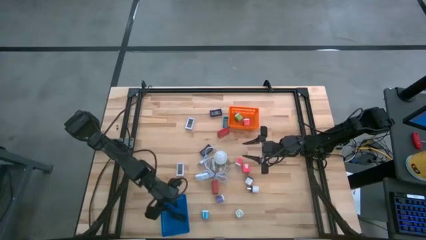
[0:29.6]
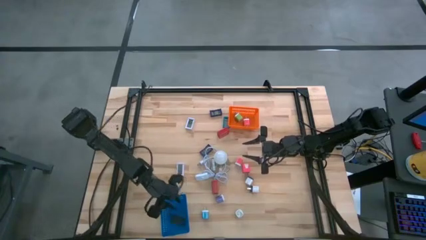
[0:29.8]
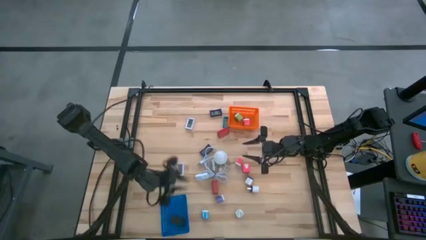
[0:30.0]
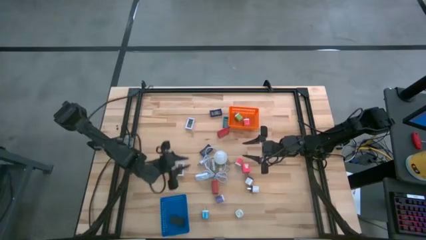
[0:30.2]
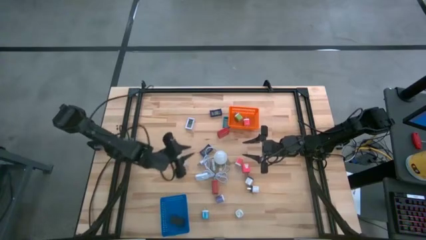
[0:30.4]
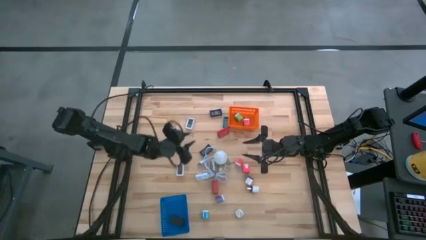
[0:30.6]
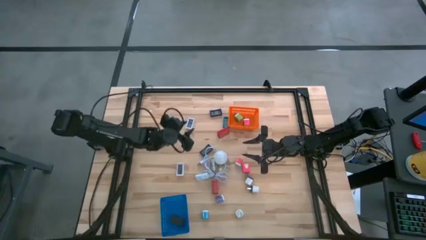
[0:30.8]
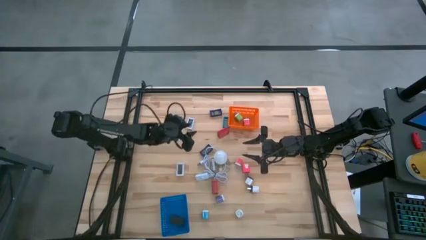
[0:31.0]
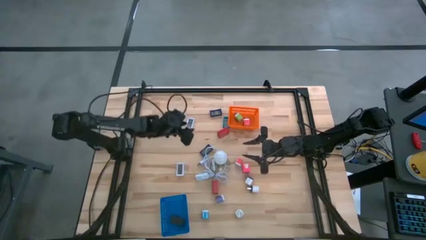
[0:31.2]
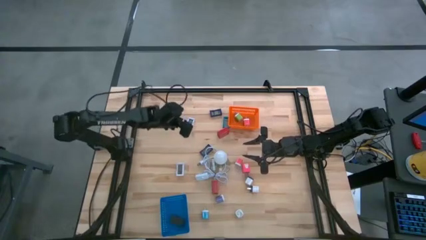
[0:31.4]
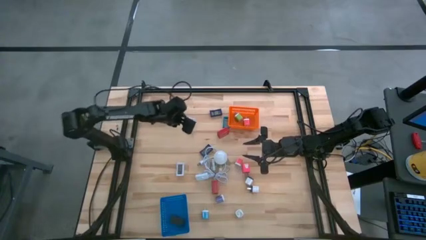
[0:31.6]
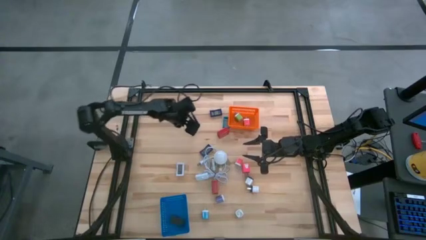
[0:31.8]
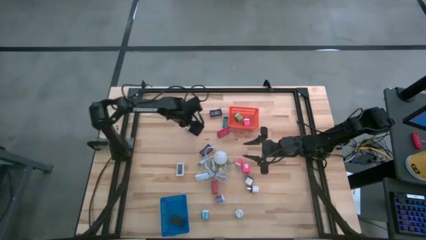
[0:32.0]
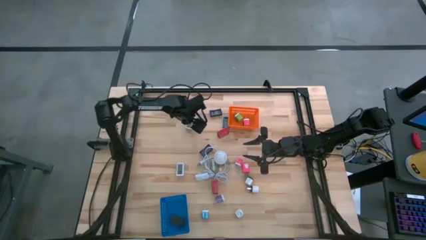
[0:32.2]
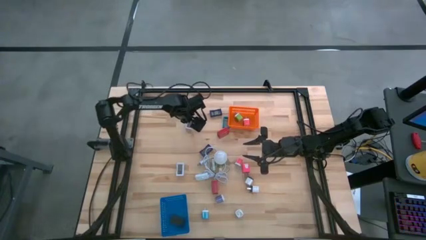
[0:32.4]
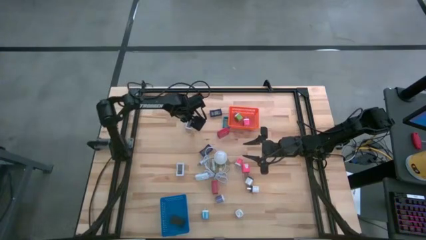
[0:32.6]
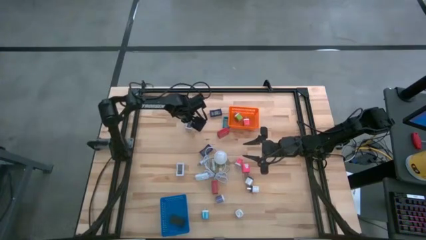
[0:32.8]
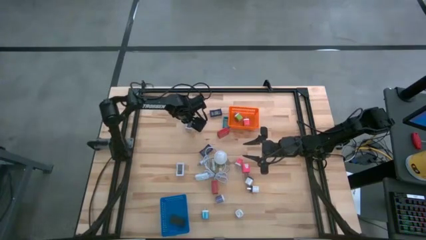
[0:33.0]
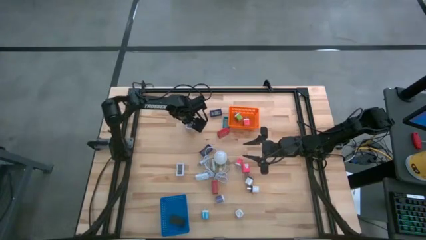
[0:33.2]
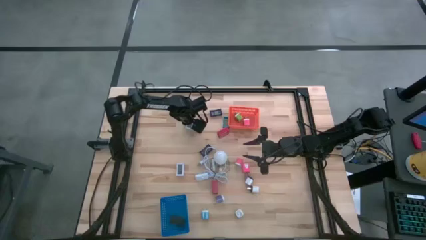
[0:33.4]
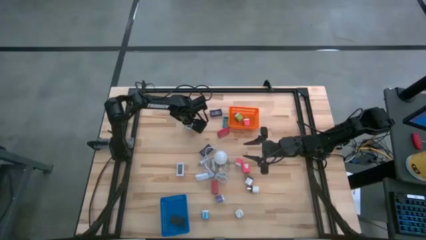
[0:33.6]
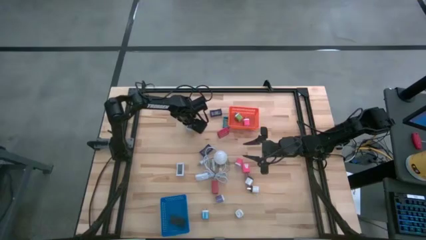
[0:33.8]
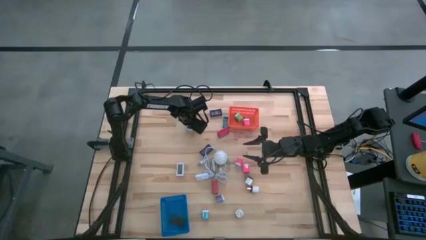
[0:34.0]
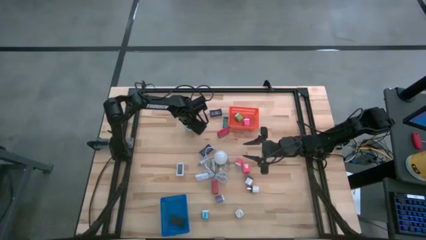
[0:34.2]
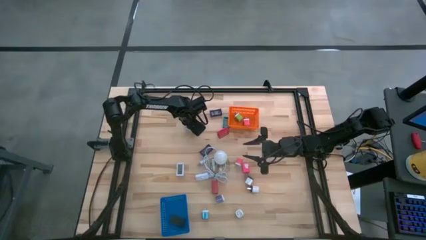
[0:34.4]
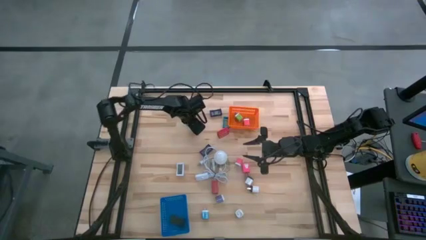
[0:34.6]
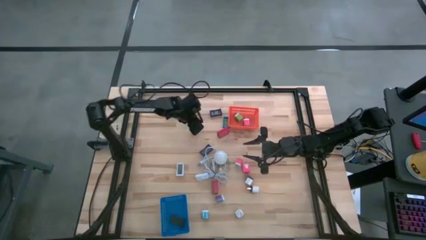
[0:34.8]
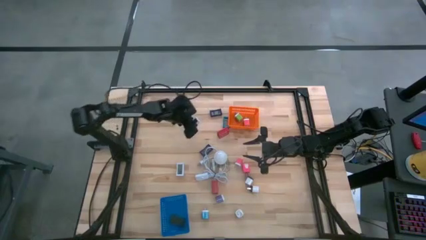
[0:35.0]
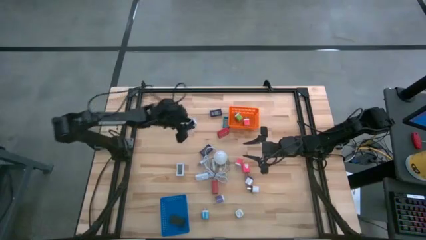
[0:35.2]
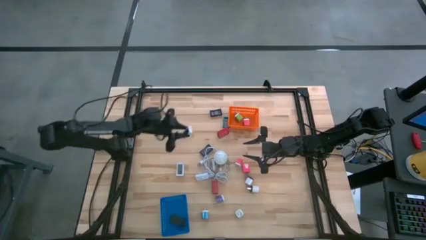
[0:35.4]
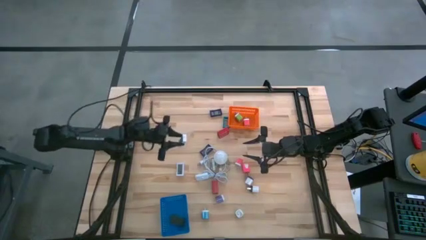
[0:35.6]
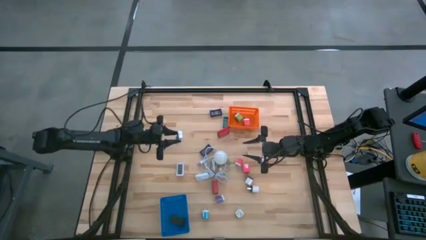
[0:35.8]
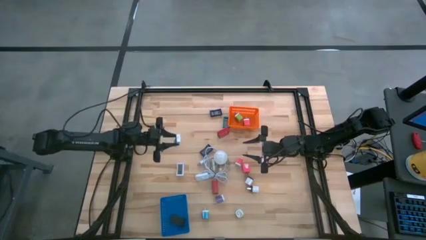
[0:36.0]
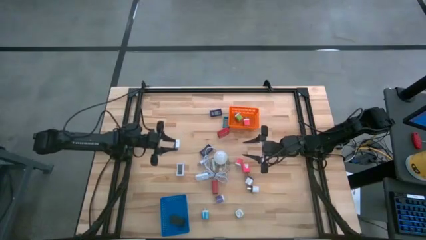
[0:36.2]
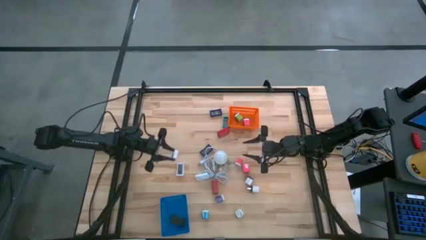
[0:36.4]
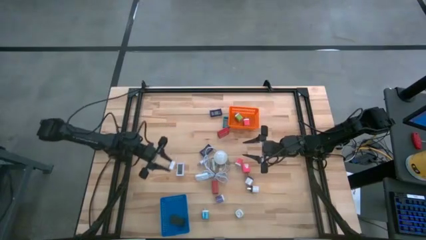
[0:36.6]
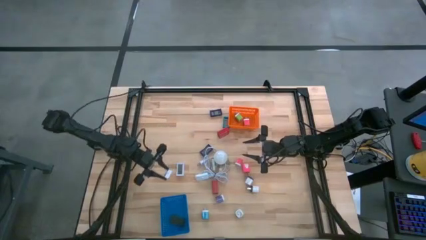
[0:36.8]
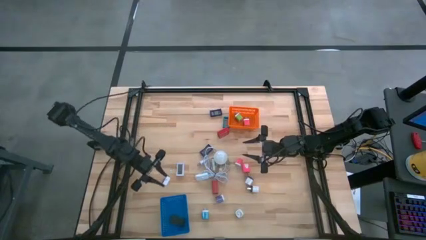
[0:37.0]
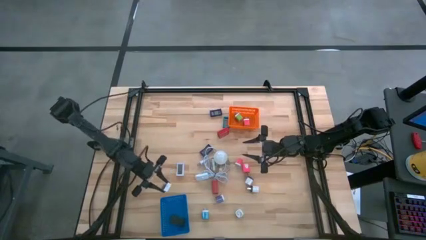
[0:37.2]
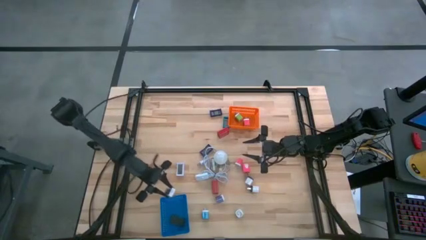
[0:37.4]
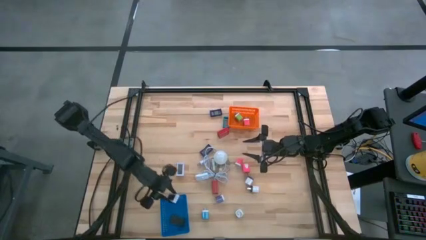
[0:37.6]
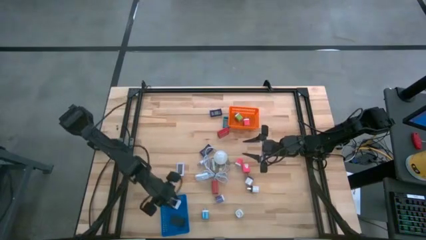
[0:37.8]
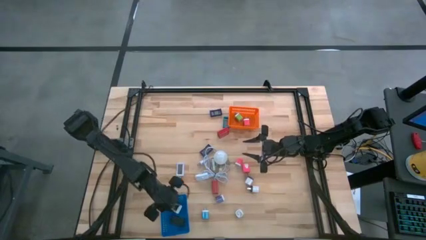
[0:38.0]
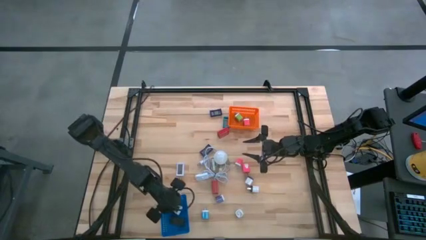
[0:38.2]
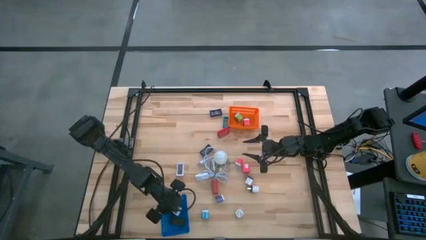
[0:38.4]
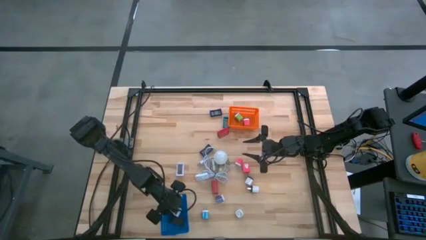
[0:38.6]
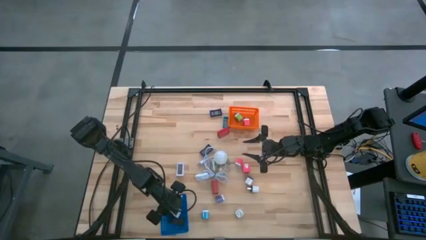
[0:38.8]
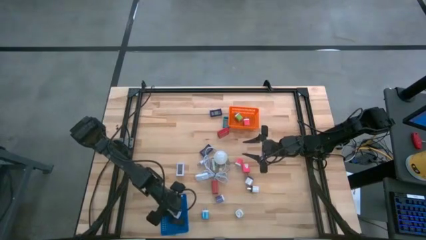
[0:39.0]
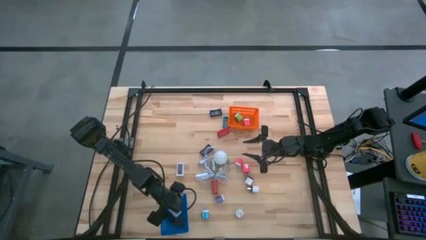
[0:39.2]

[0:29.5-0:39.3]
Task: Pick & Place Office items
Put the top white timer into the blue bin

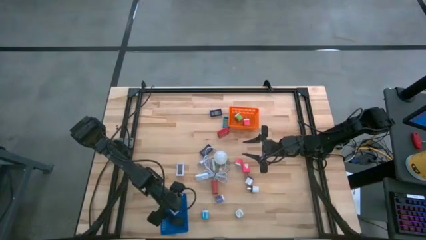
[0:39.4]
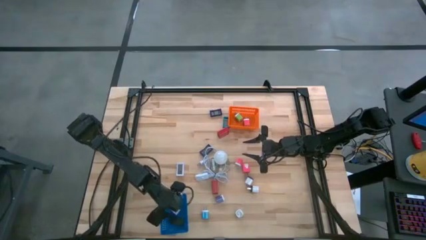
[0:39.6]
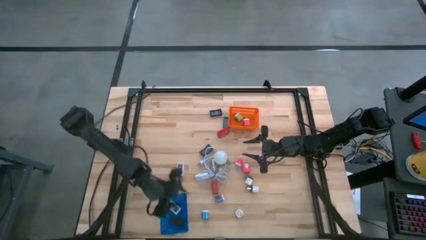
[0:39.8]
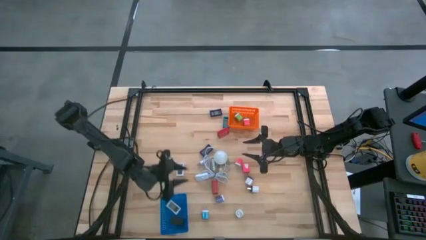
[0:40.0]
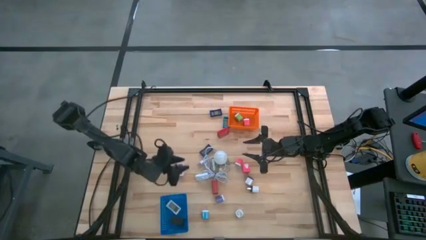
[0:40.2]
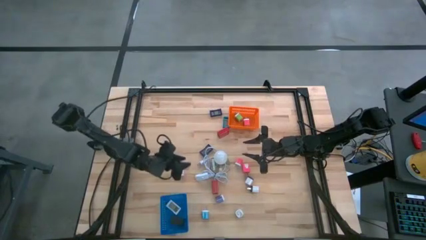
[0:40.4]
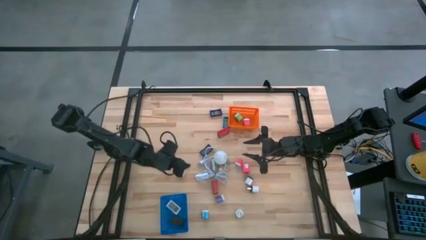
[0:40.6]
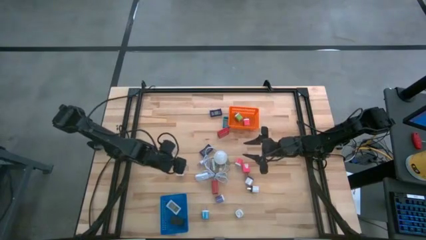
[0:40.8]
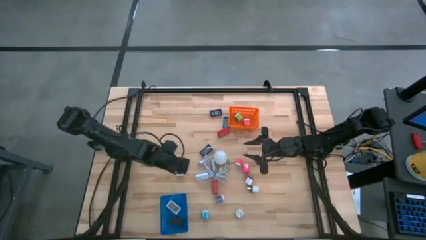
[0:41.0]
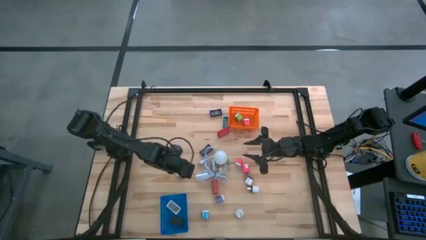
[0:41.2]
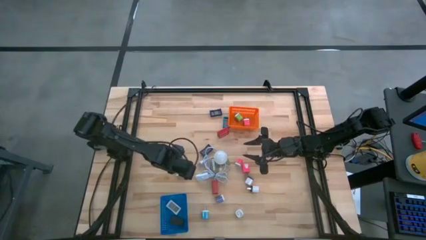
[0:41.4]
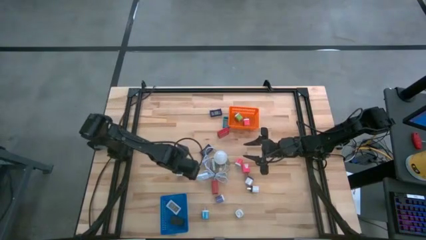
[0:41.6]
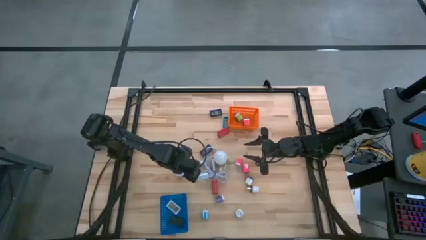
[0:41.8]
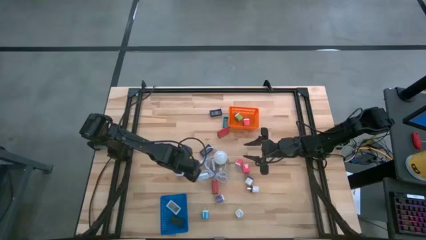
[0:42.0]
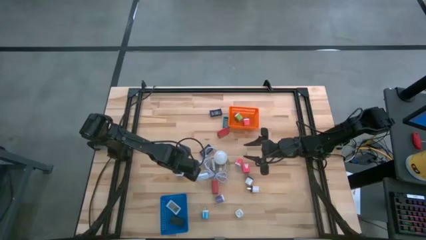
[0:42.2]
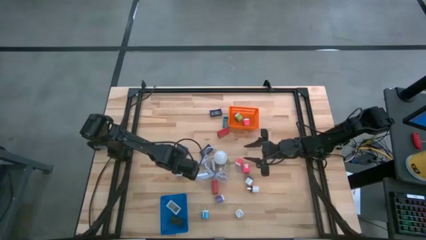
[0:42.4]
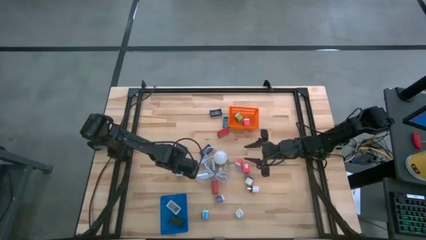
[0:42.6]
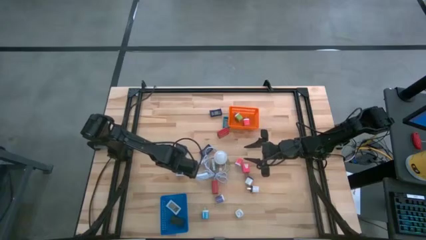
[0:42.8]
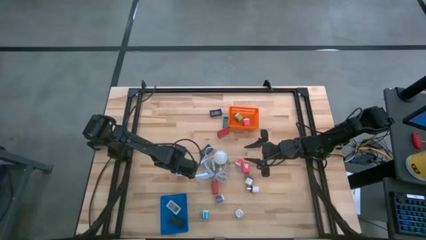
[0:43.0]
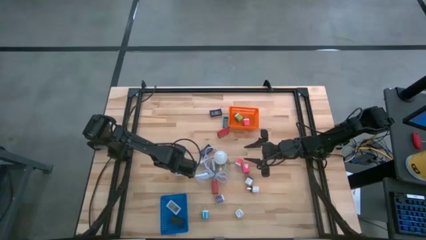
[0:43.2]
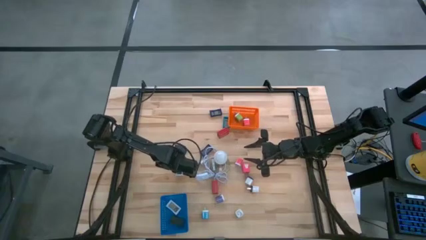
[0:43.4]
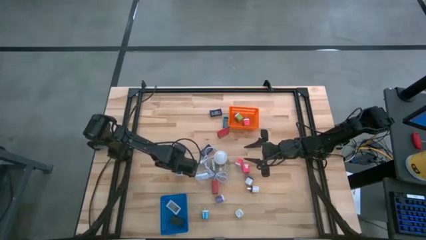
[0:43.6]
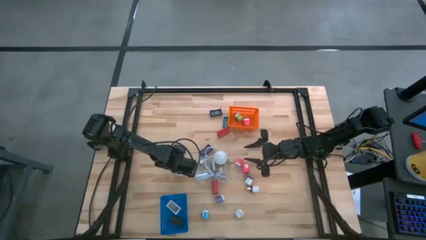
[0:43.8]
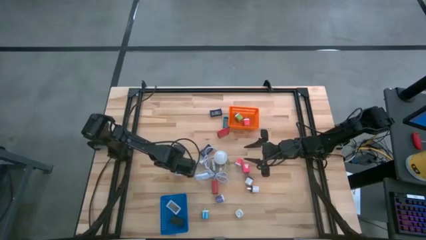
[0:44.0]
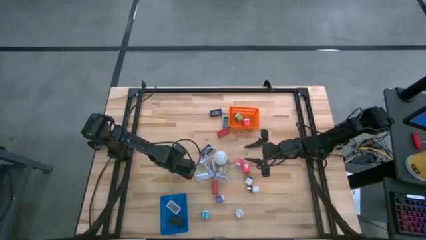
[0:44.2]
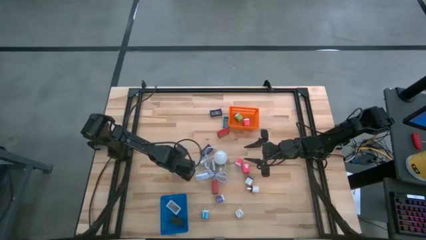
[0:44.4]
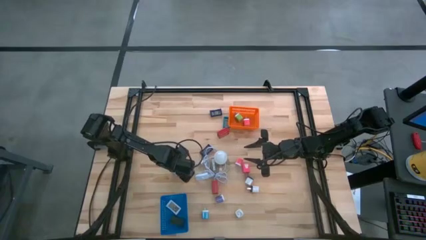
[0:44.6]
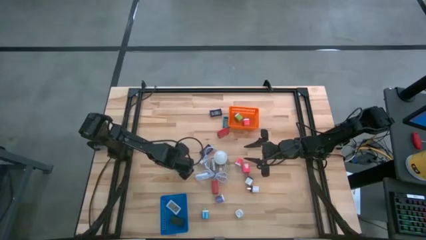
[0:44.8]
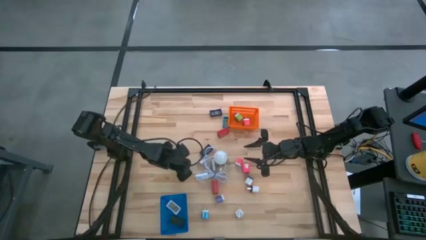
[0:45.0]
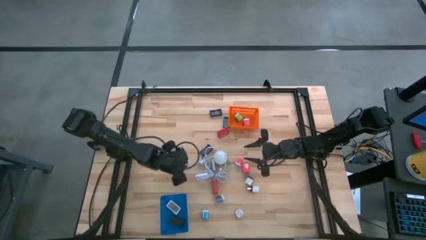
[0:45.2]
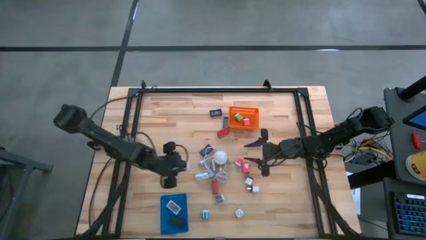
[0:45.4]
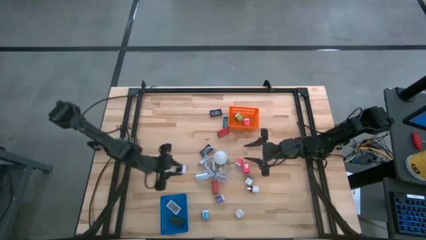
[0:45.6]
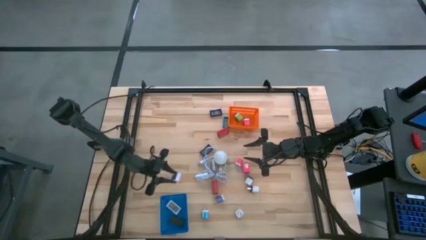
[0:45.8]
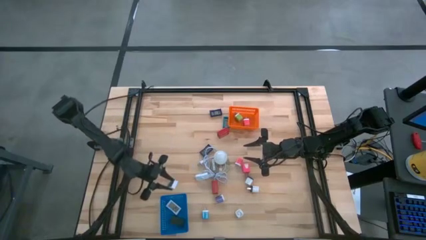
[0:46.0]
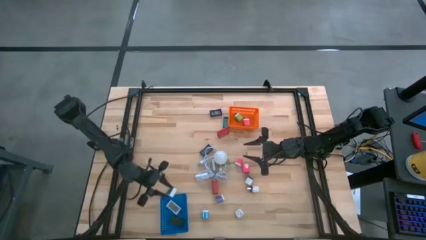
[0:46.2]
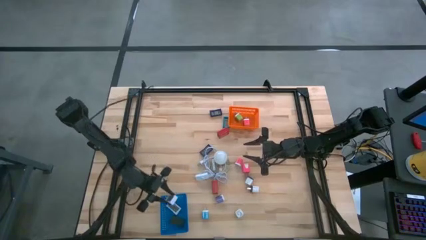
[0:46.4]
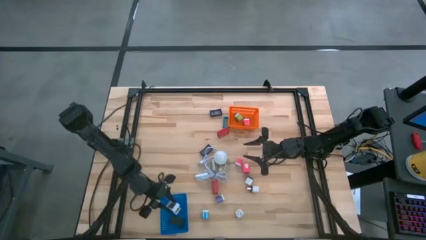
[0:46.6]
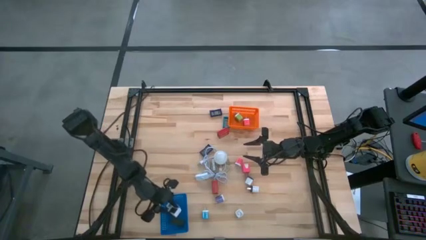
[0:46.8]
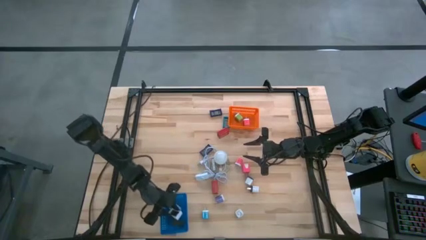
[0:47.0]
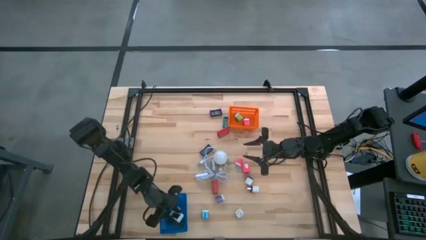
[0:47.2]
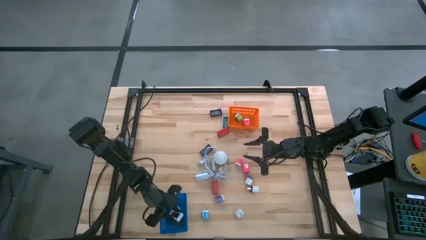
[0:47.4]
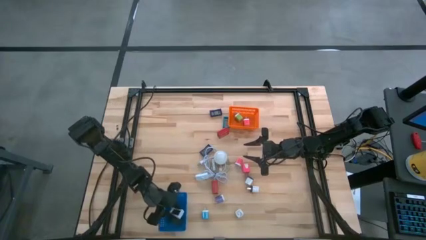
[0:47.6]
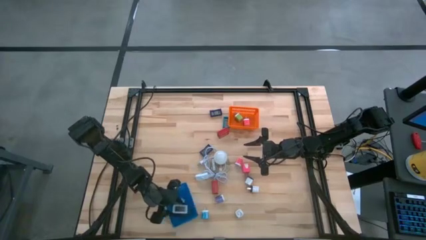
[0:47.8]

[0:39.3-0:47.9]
Put the white timer into the blue bin
